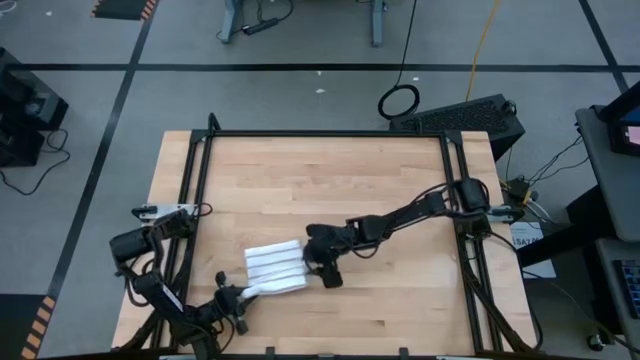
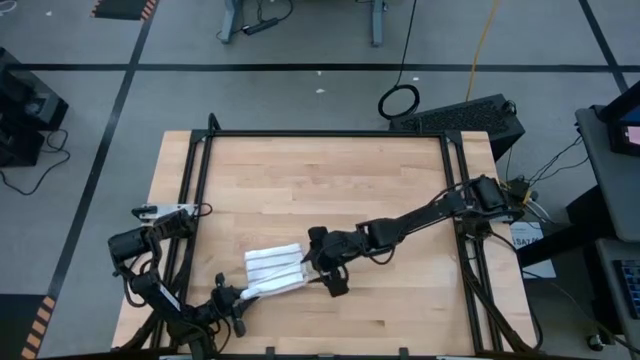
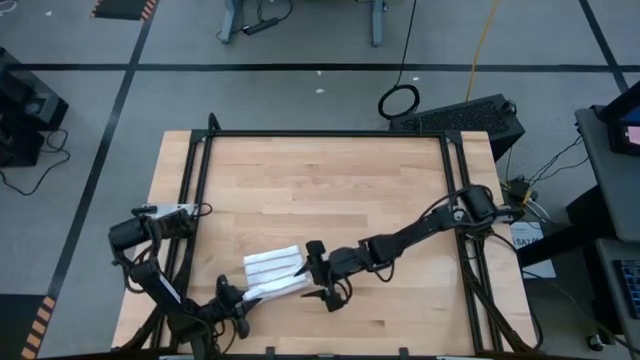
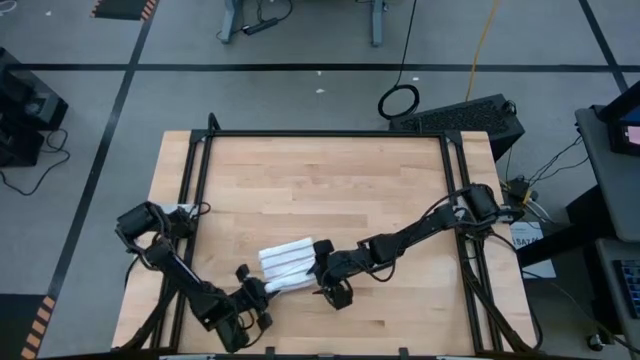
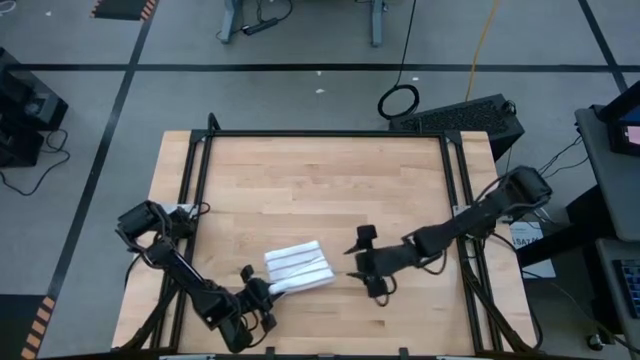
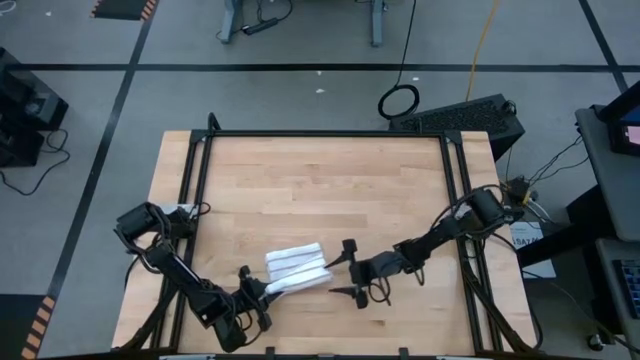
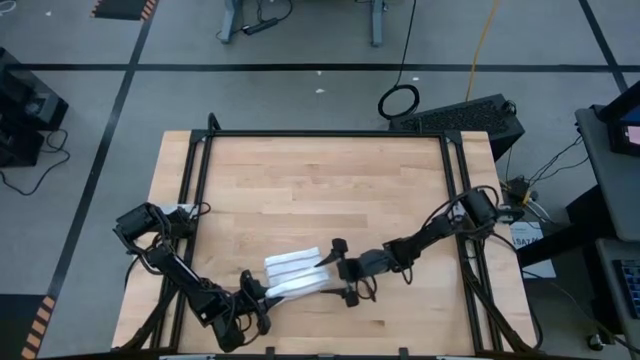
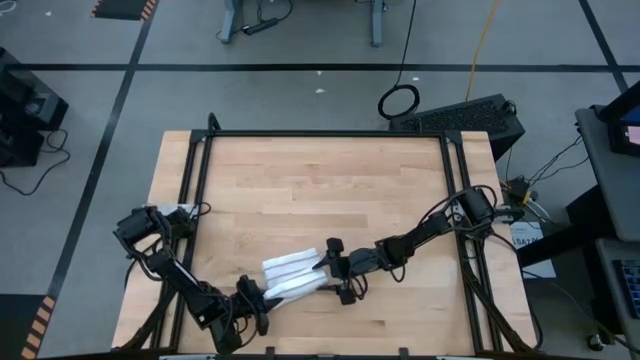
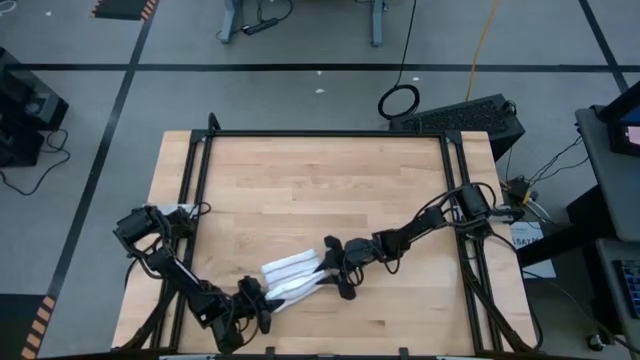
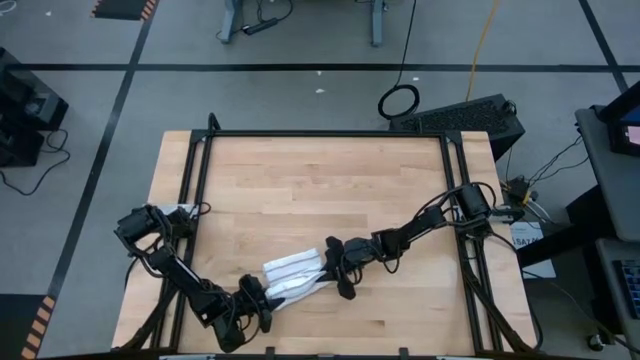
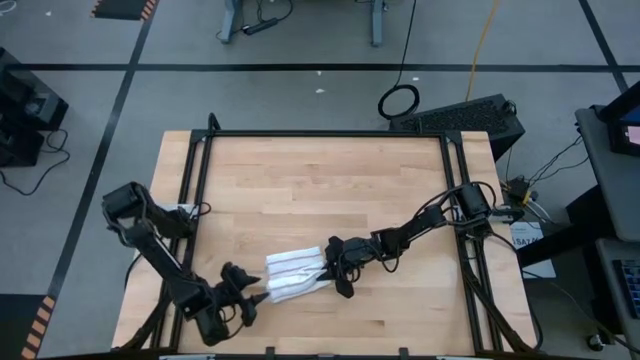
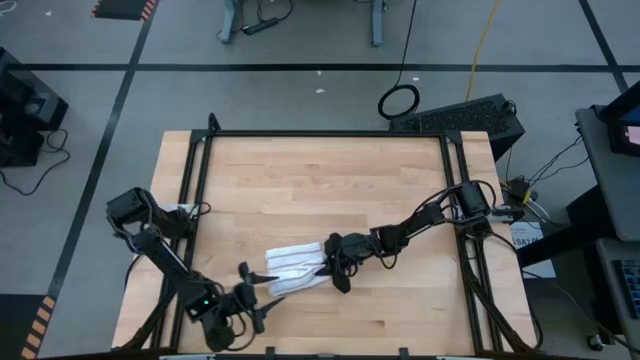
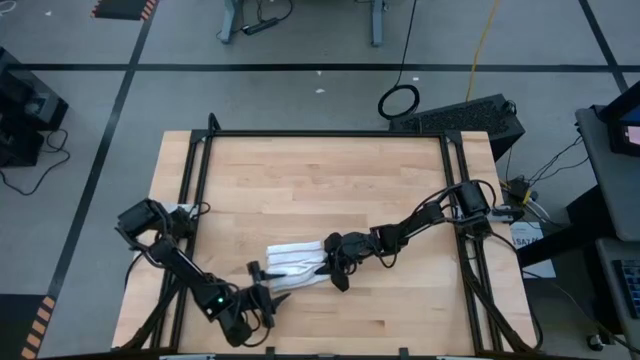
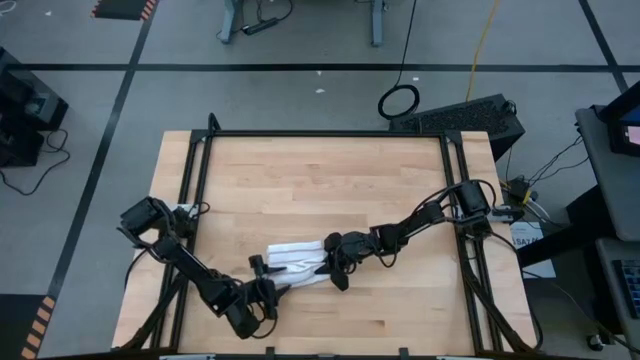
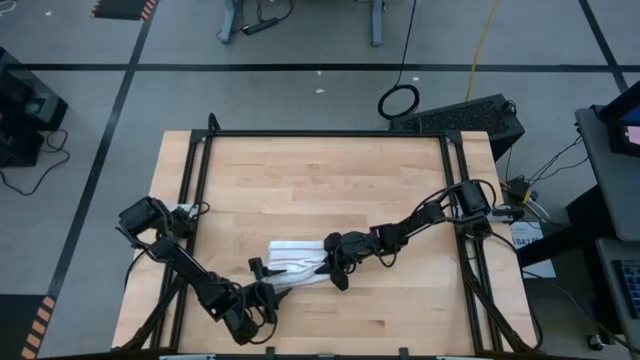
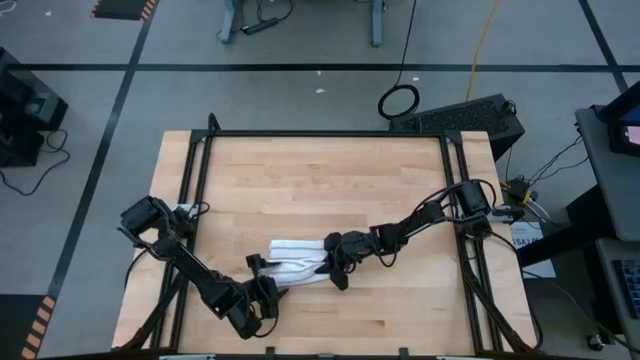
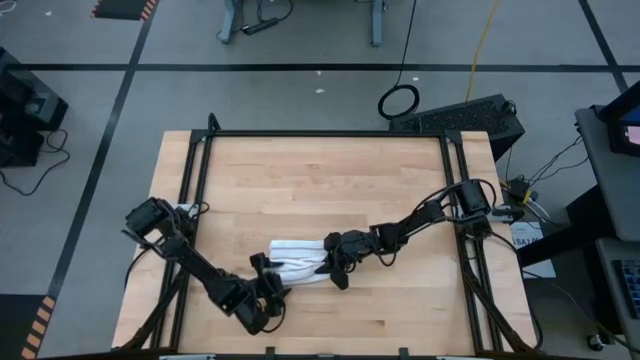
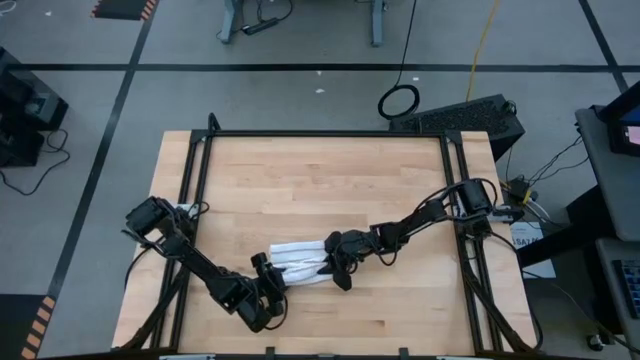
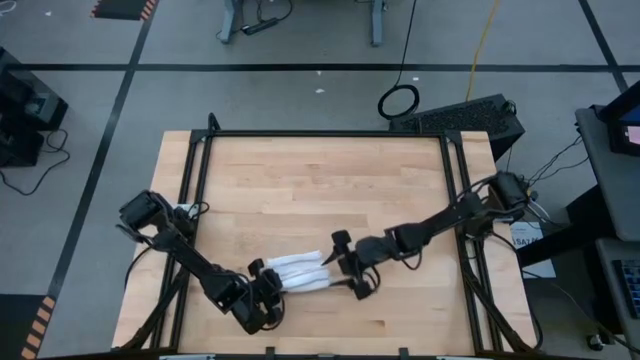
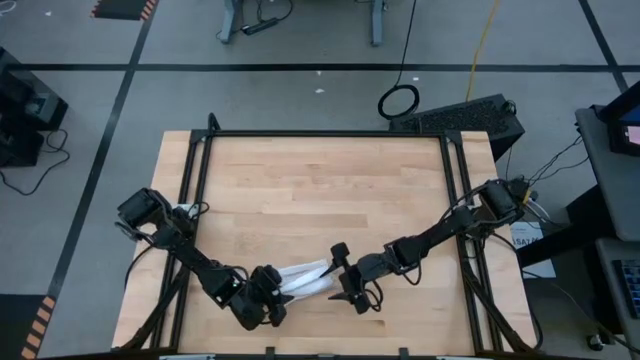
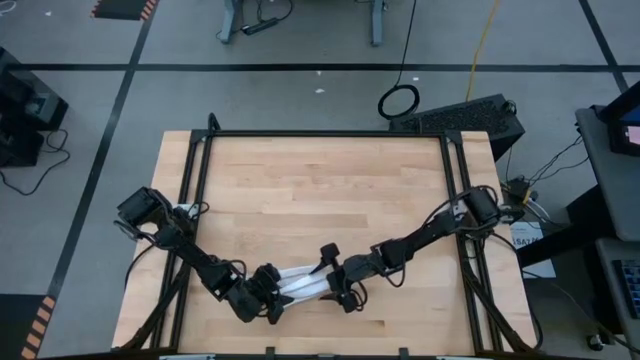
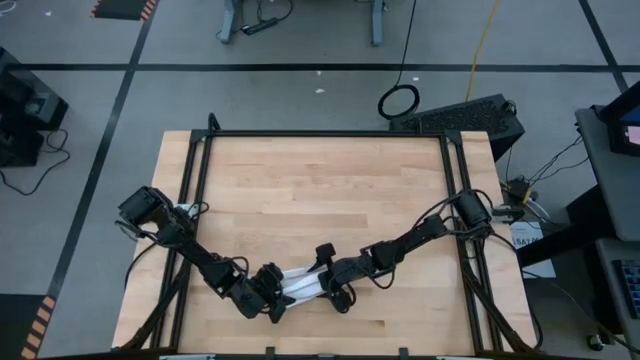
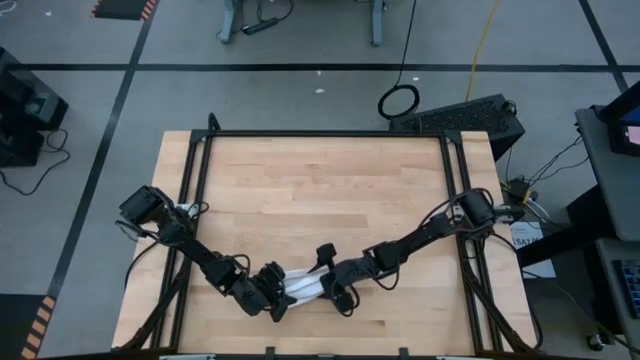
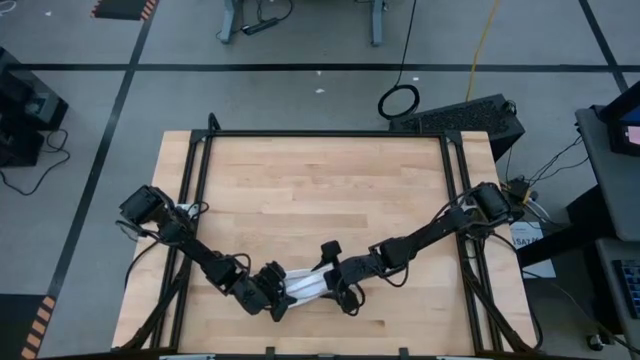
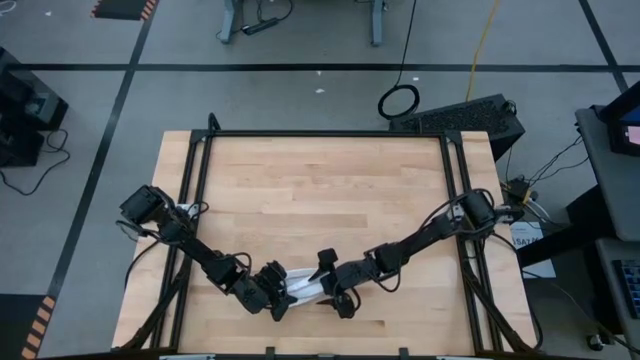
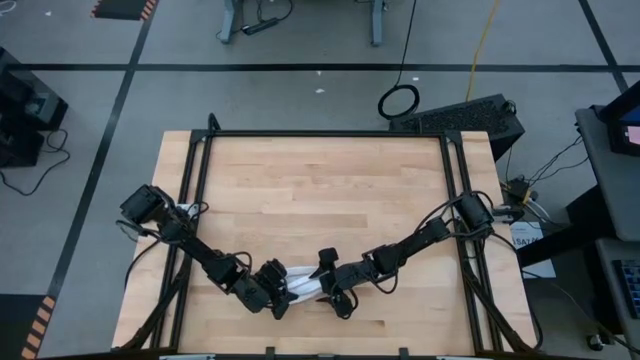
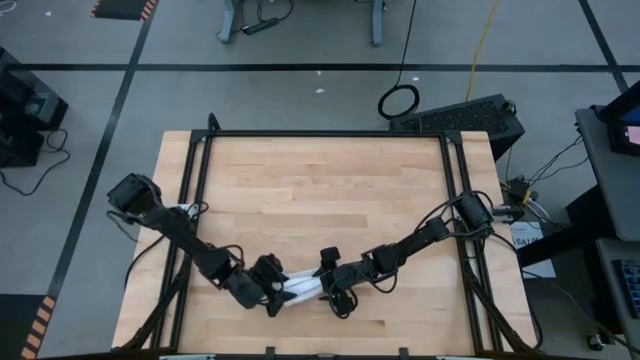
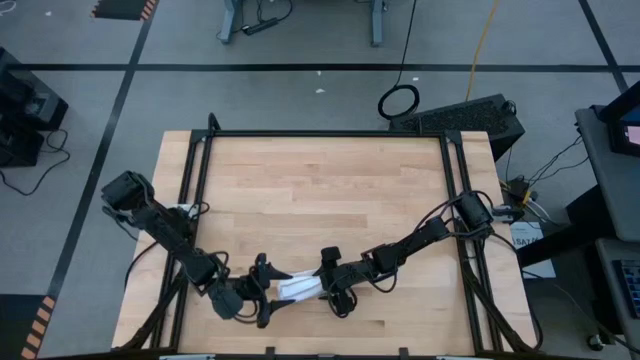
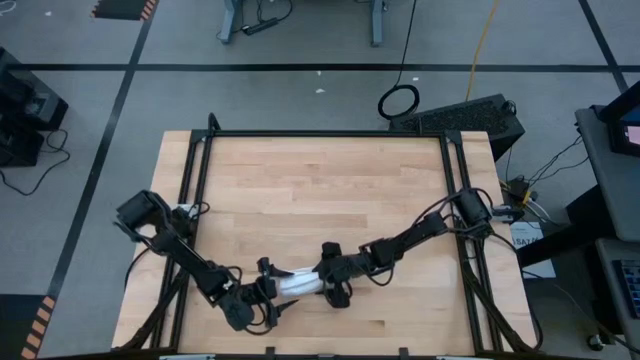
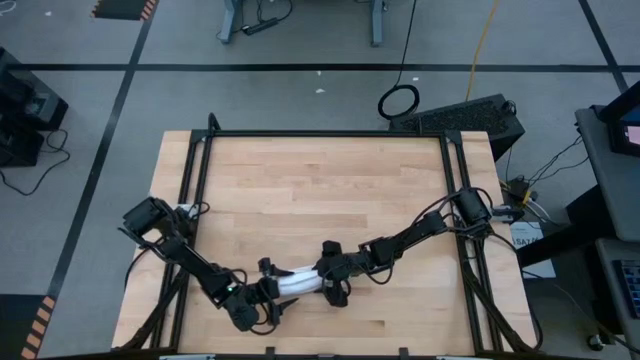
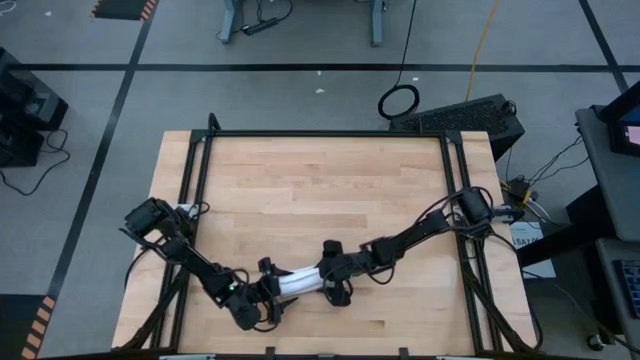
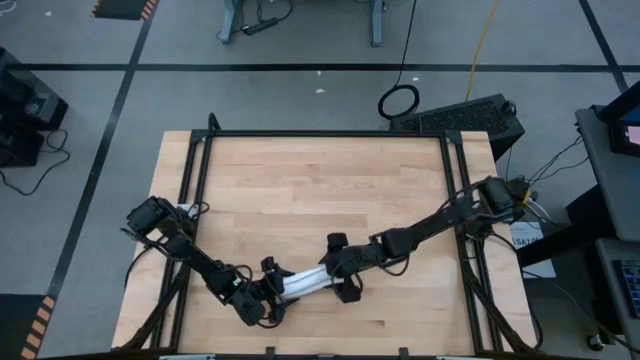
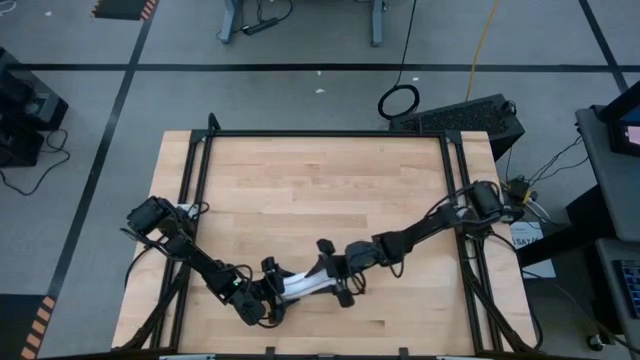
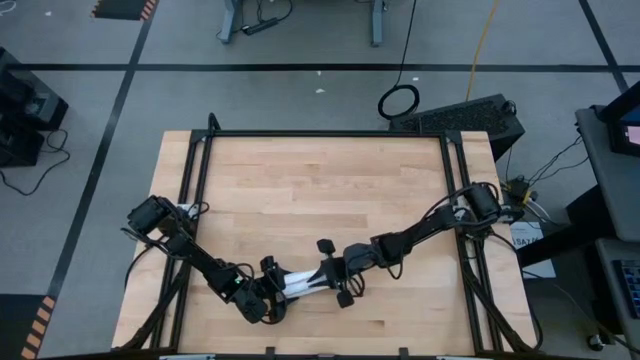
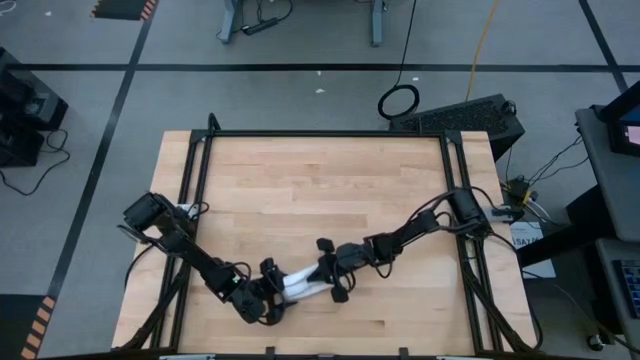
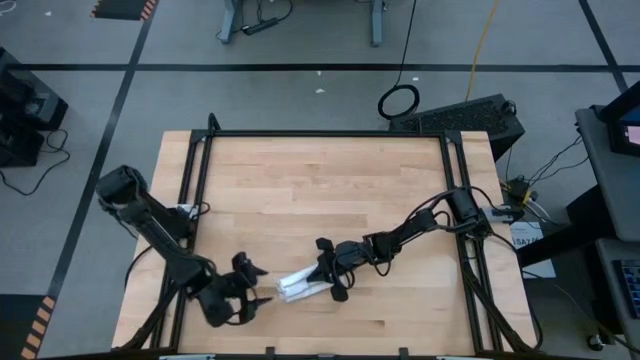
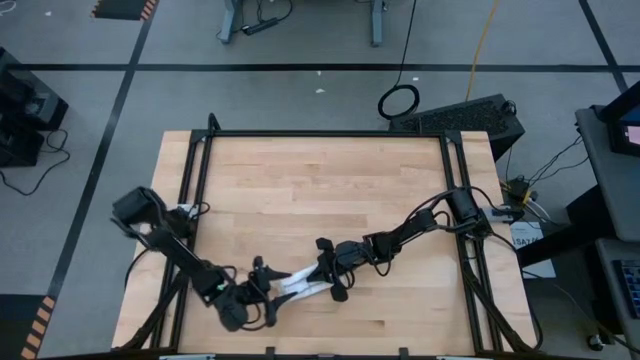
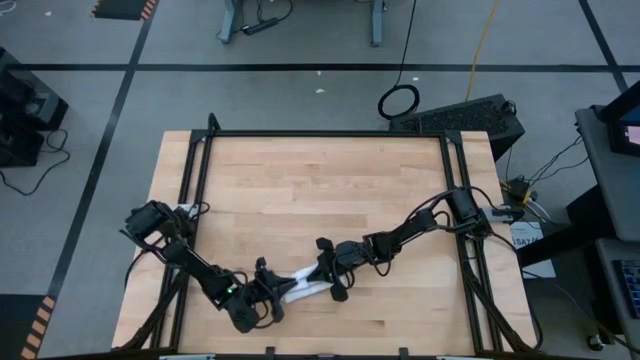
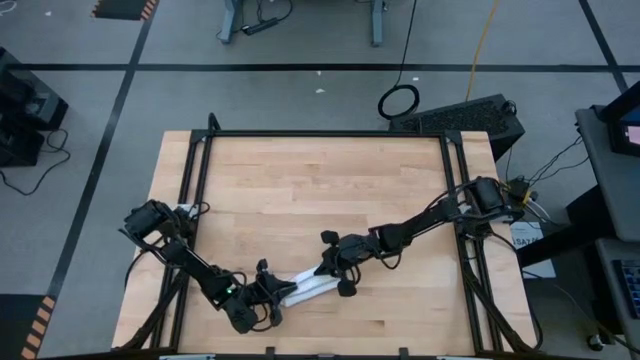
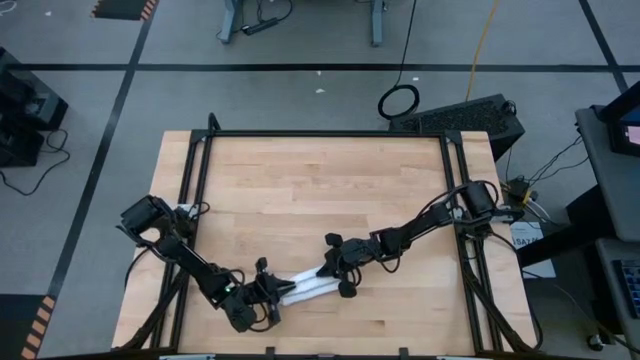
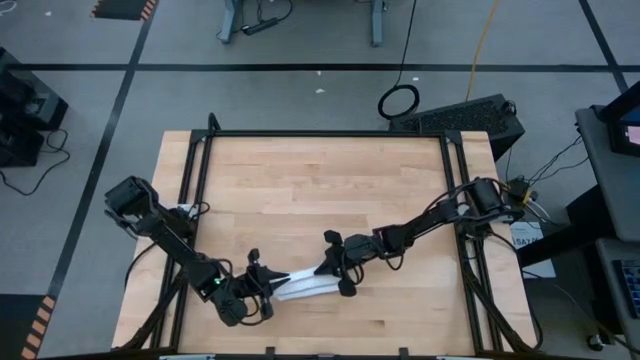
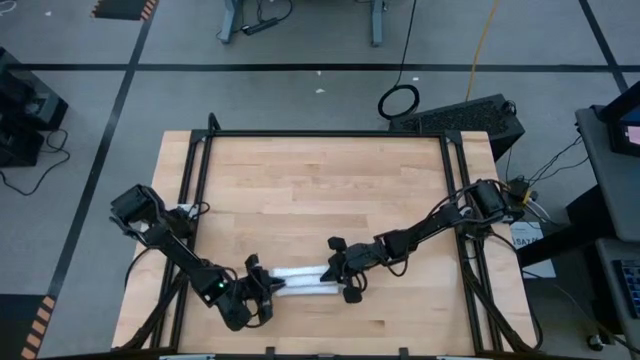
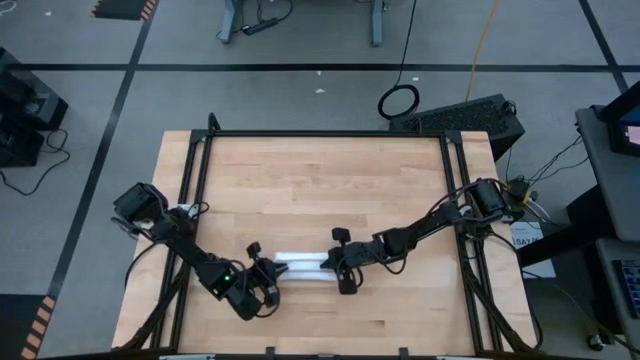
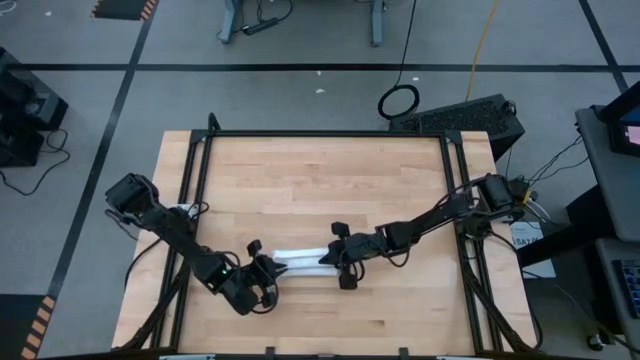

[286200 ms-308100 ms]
Task: Roll towel
Roll the white towel
